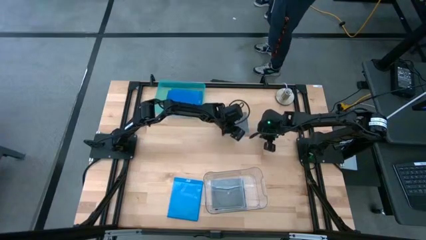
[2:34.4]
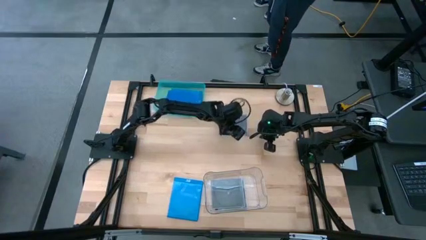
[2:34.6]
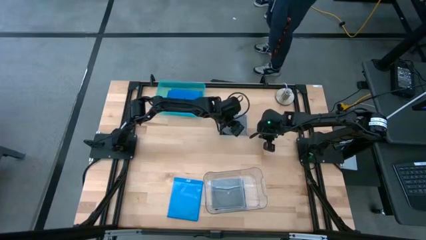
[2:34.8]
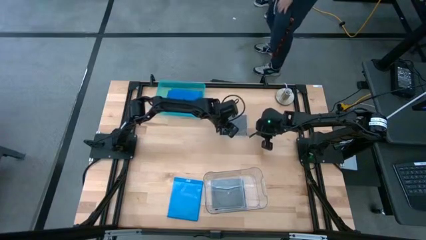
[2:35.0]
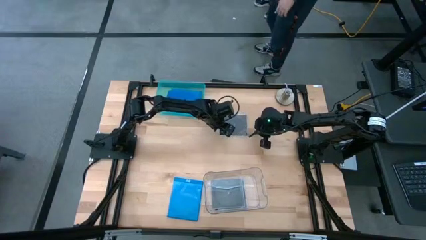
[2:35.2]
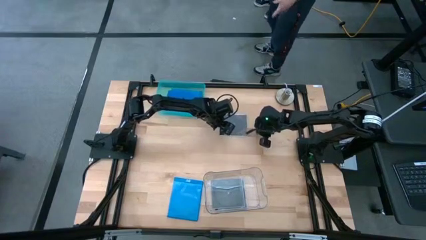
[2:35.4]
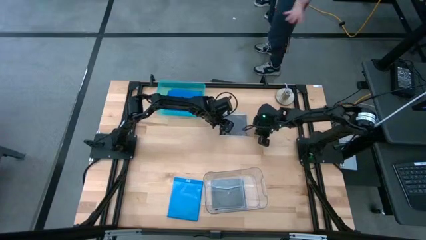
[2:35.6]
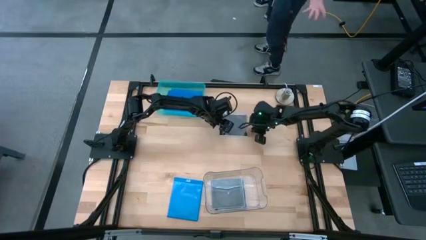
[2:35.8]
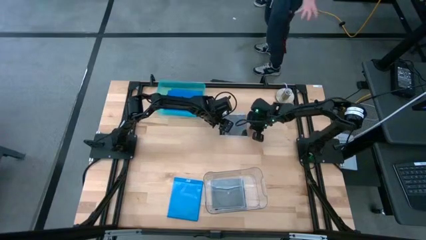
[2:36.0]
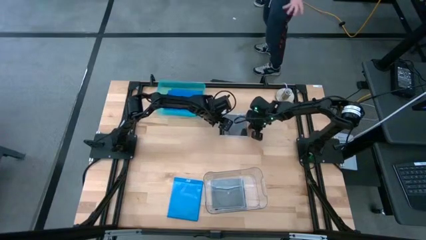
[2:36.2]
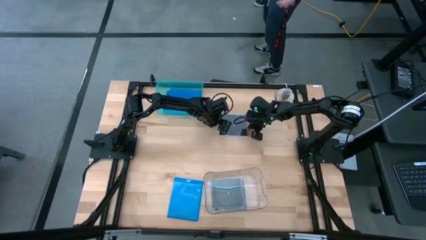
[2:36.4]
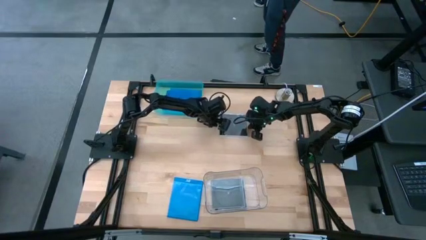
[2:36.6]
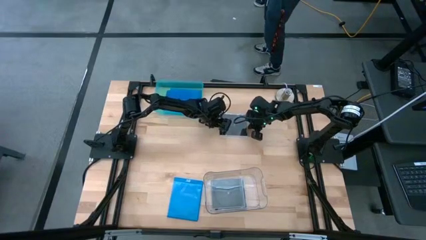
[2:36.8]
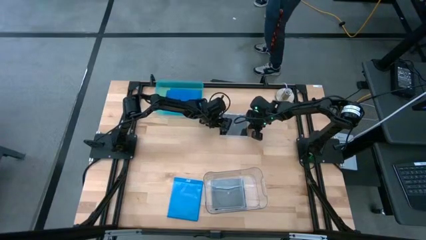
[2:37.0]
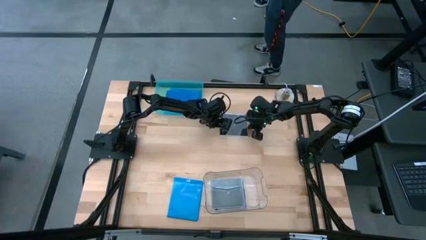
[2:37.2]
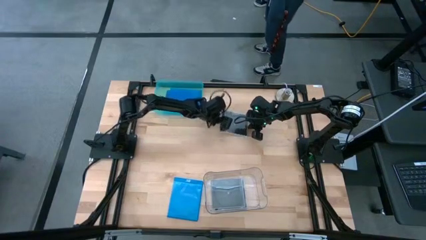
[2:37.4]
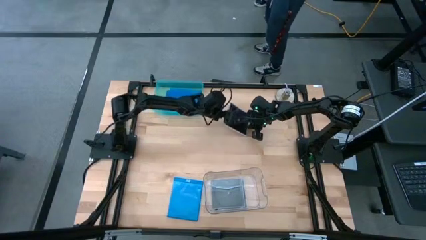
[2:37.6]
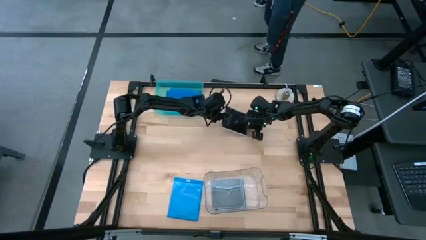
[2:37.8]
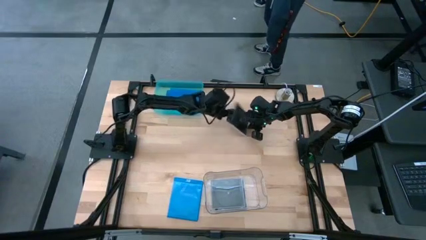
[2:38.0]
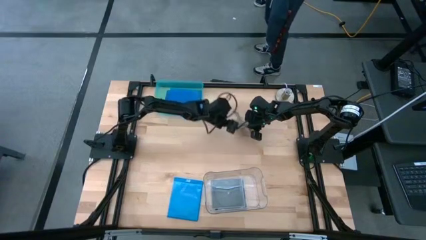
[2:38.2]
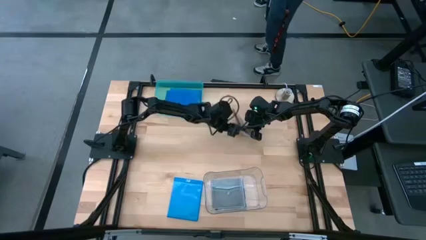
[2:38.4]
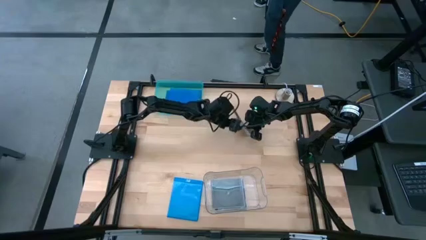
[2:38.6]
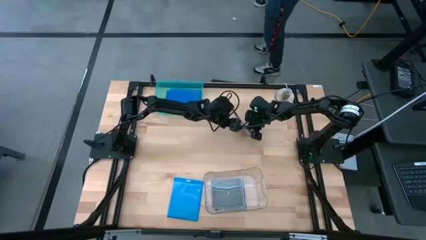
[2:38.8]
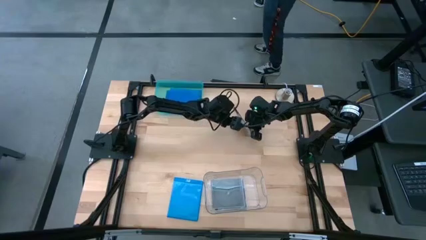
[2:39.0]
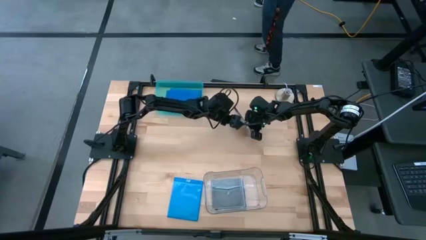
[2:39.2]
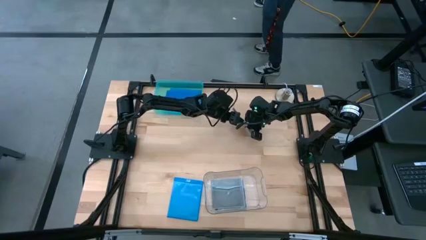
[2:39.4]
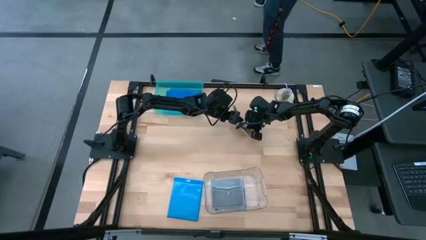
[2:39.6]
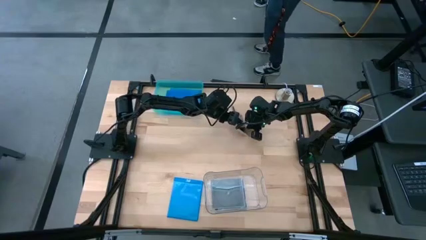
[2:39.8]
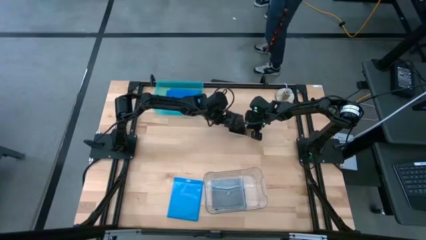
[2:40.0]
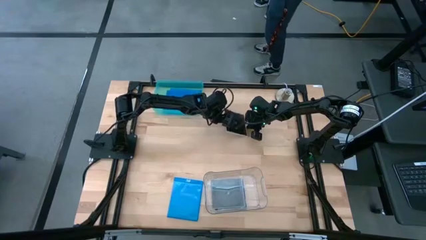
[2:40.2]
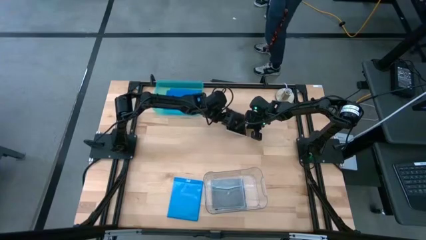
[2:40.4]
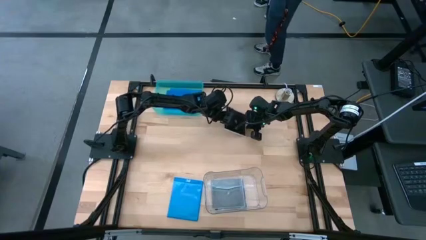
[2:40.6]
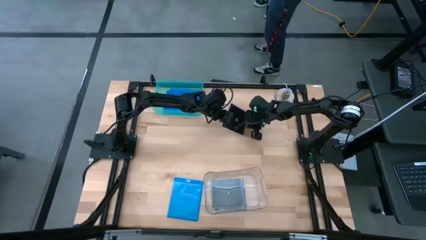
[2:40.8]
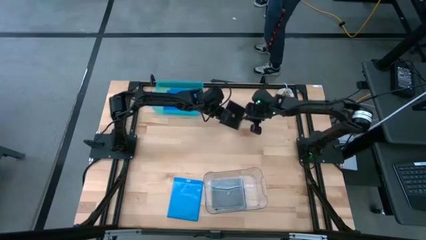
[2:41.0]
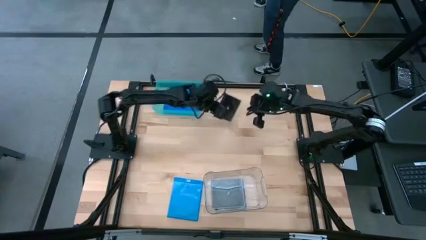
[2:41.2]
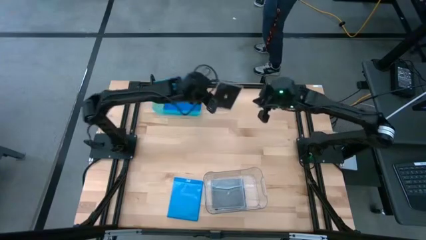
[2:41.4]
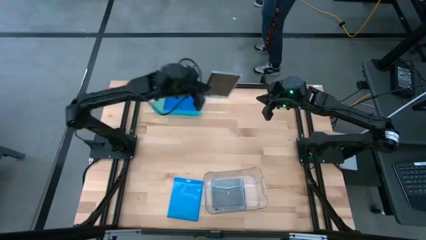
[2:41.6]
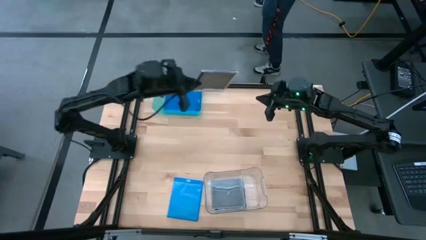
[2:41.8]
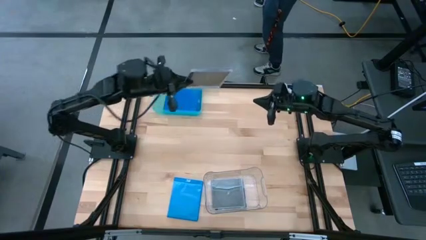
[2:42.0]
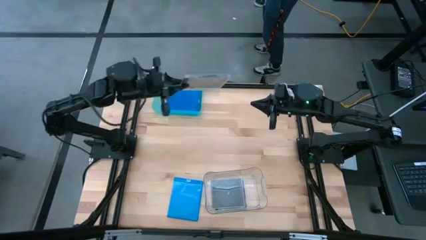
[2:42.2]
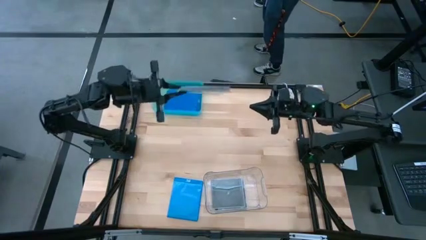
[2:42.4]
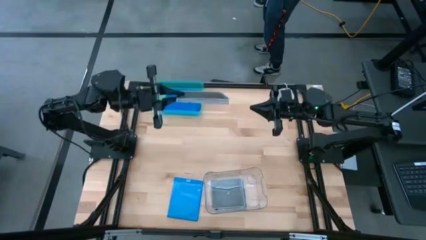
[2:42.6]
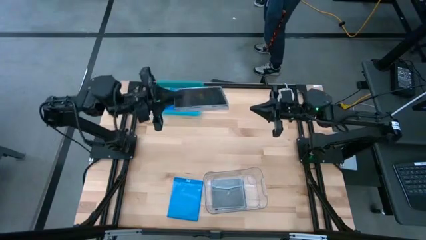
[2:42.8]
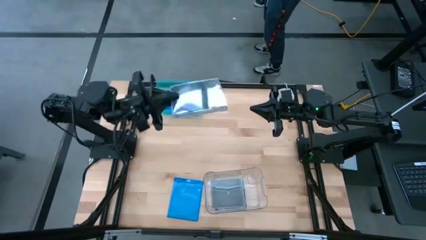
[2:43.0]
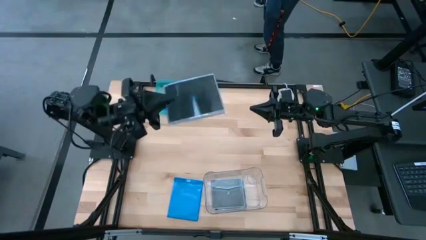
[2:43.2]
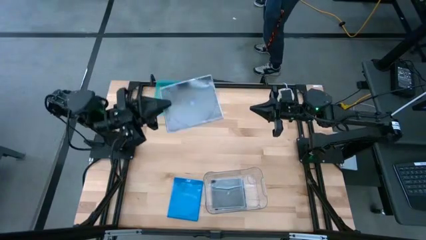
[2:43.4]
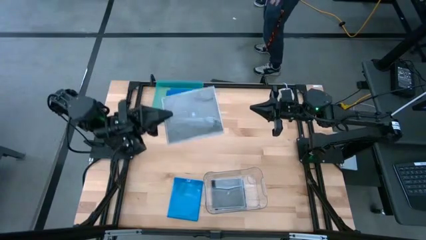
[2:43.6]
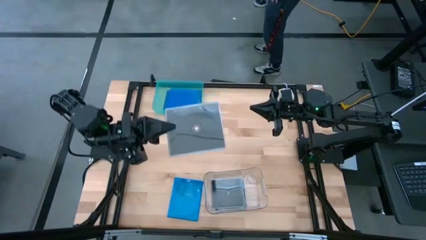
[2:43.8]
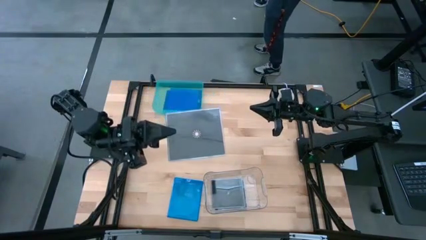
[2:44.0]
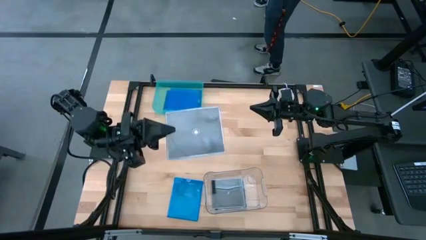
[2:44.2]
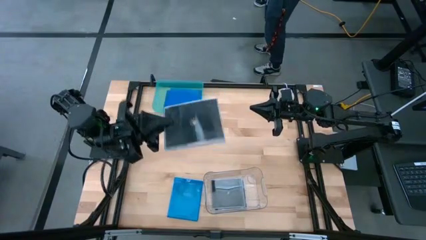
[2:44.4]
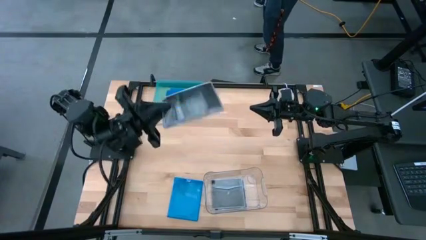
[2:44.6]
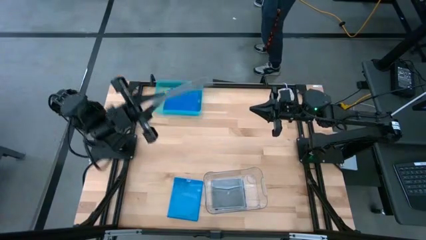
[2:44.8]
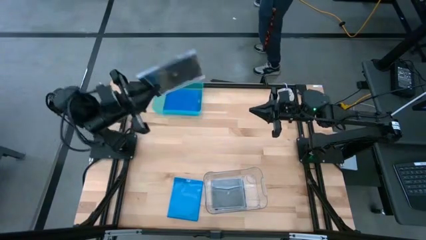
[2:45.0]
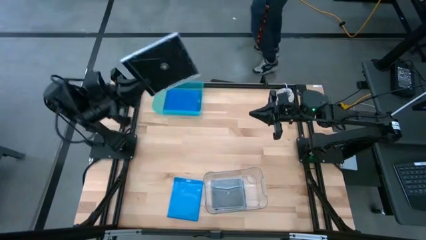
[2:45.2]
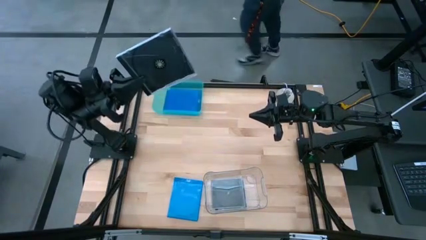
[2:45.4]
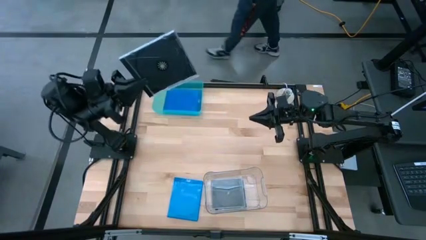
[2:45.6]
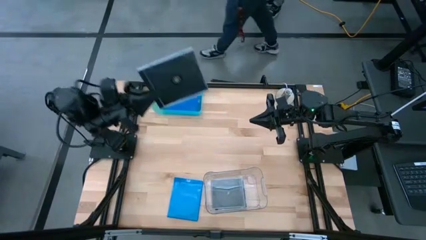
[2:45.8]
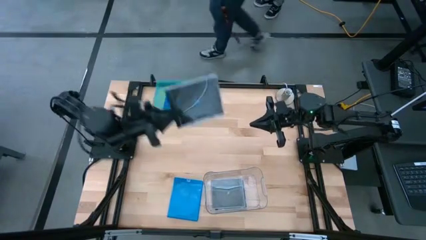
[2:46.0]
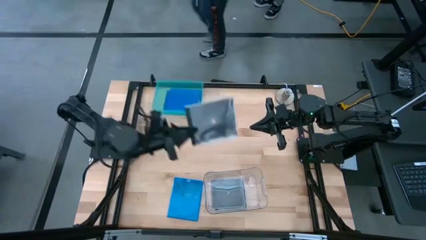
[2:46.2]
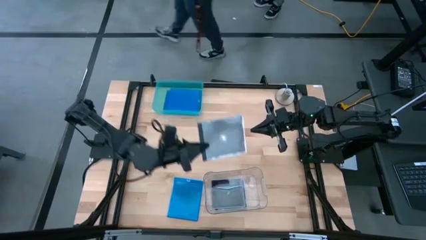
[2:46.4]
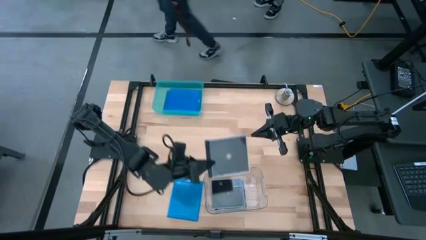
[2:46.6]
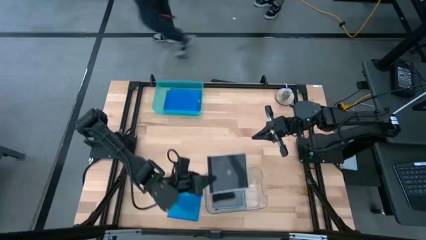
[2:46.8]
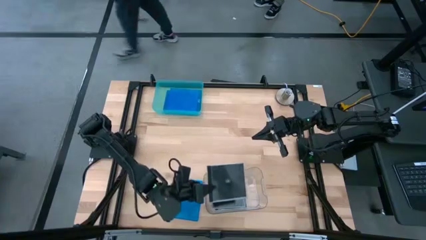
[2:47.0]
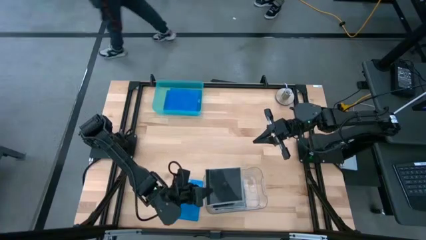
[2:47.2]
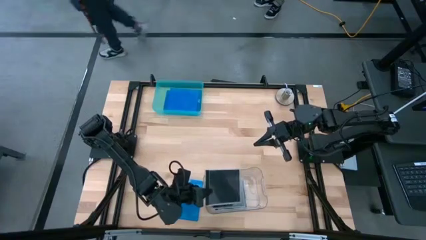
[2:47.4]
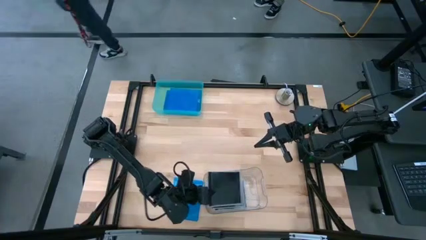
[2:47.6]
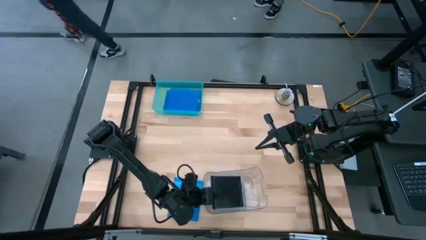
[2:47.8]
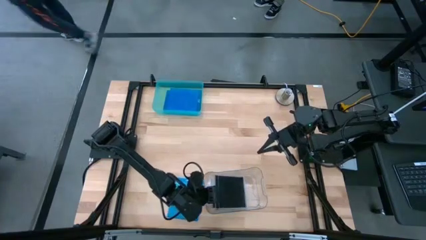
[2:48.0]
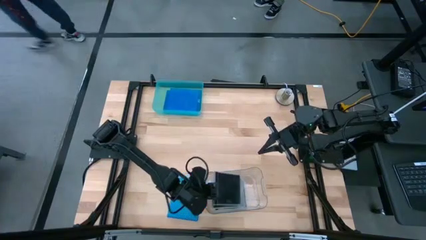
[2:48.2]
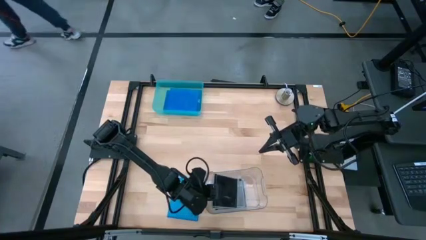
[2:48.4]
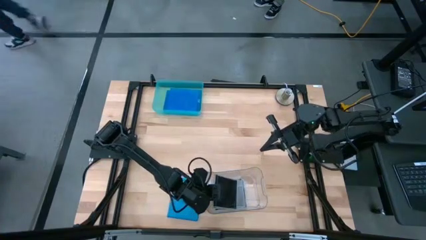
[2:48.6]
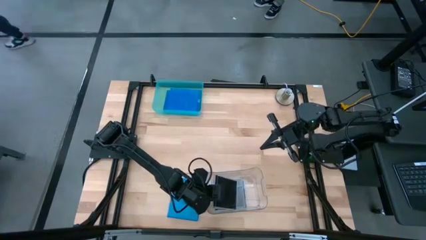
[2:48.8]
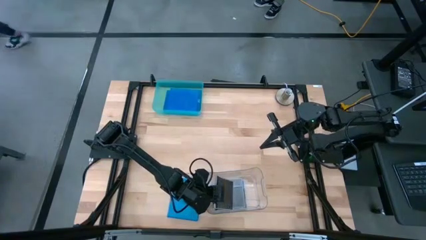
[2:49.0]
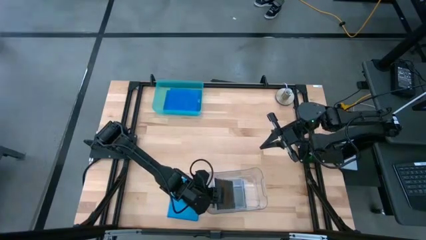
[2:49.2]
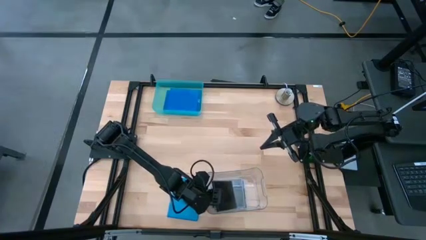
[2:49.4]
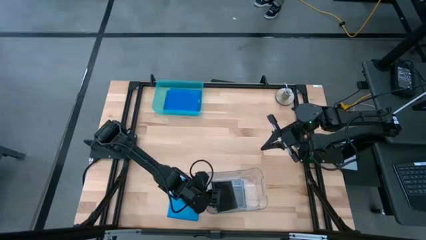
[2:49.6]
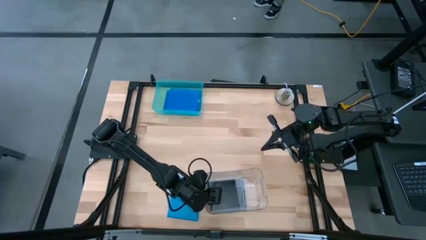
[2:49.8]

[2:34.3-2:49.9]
Task: Pick & place jewel cases by type
Put the black CD case into the transparent bin
